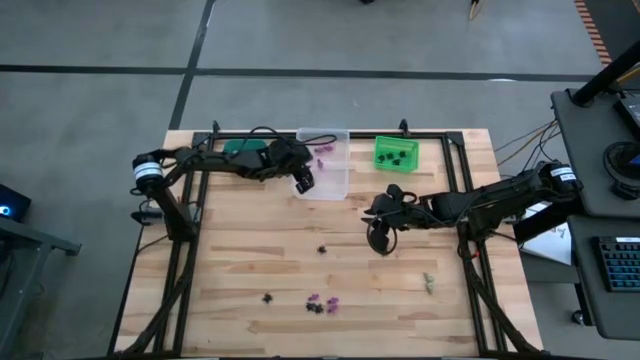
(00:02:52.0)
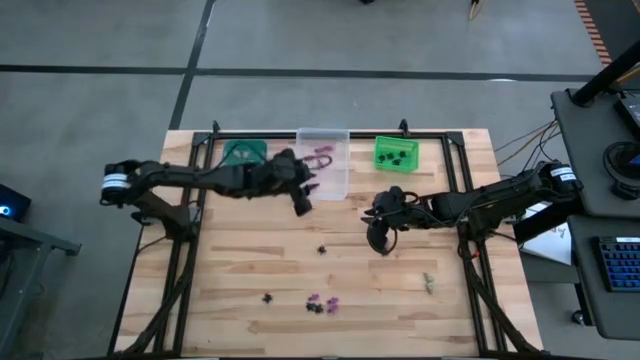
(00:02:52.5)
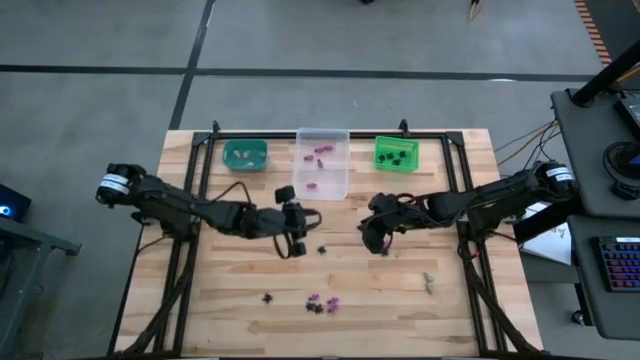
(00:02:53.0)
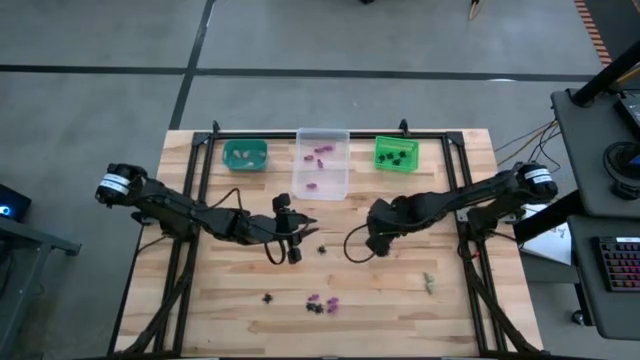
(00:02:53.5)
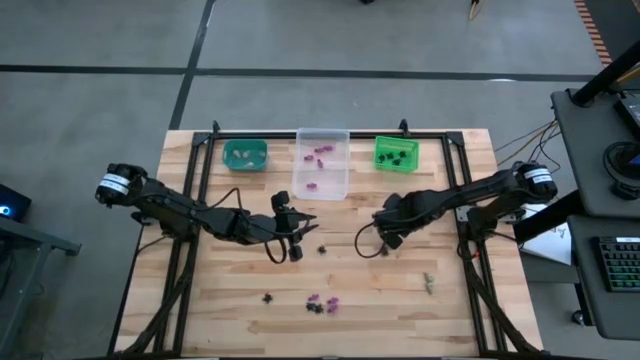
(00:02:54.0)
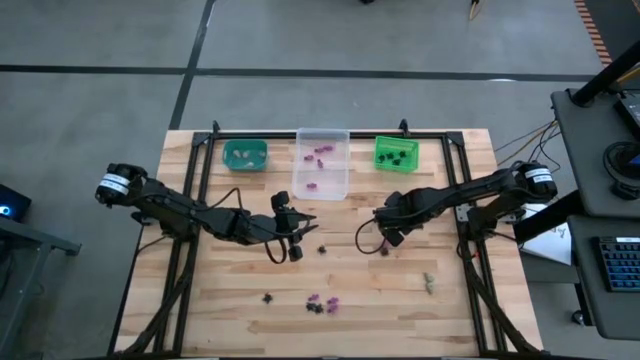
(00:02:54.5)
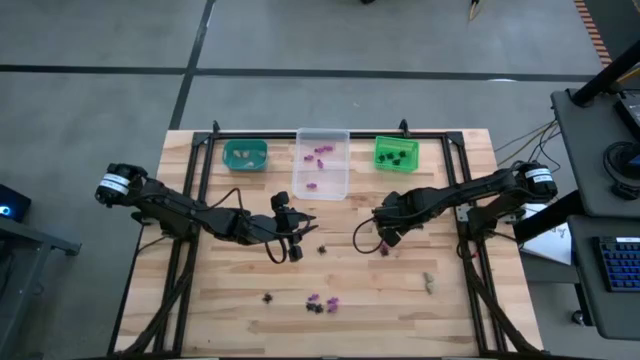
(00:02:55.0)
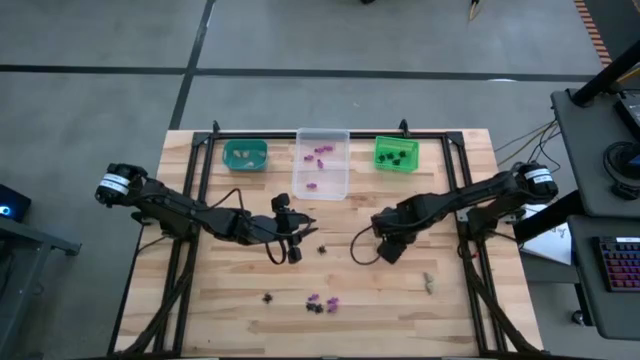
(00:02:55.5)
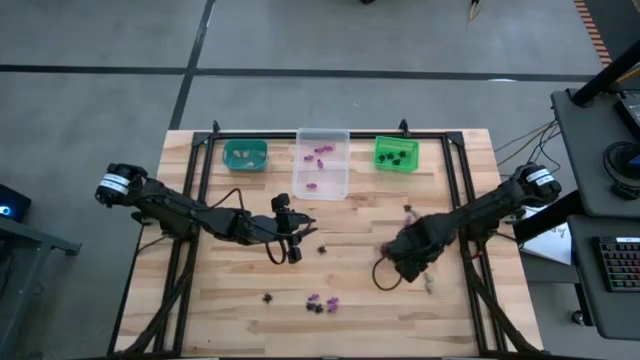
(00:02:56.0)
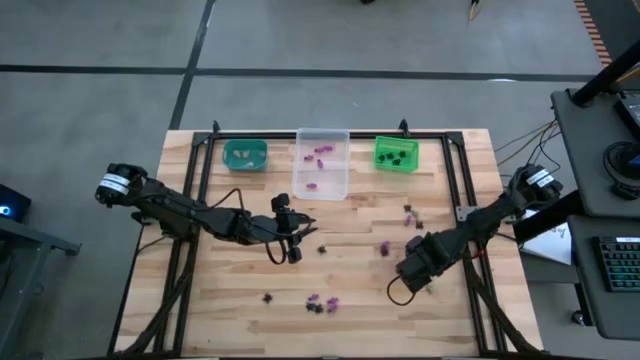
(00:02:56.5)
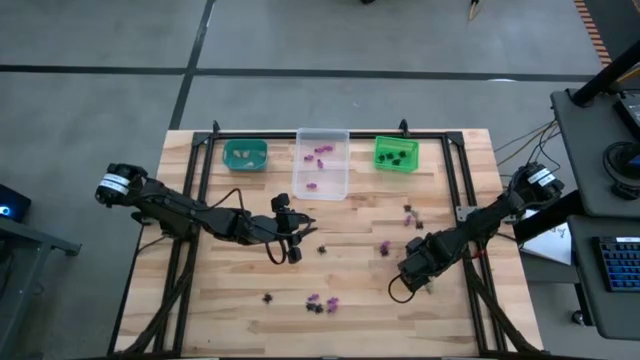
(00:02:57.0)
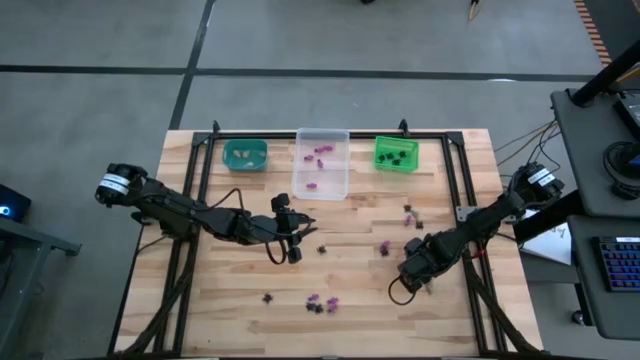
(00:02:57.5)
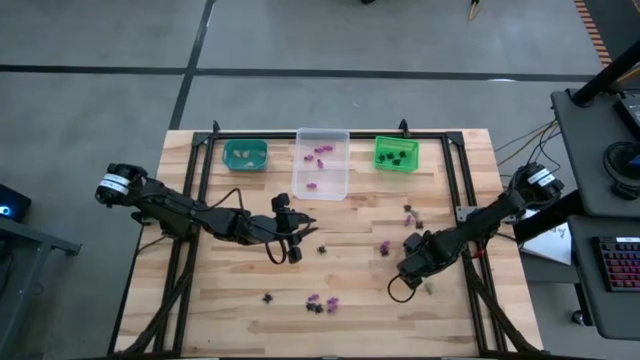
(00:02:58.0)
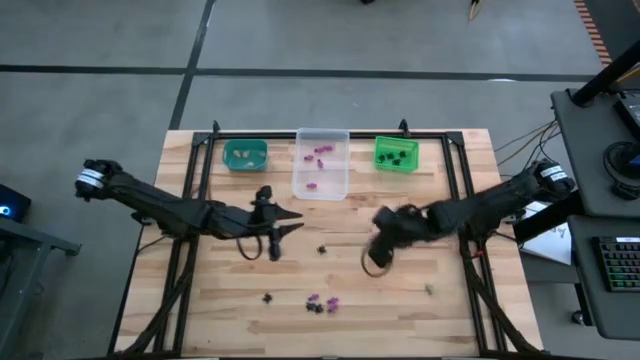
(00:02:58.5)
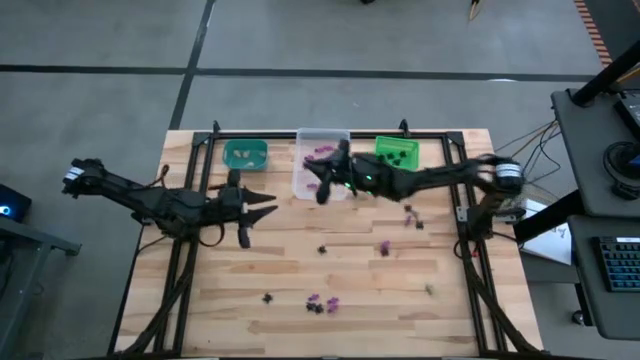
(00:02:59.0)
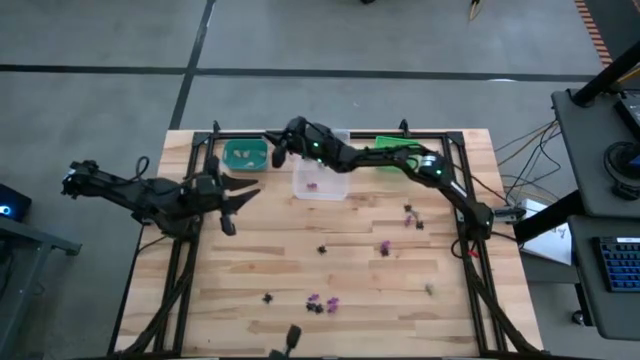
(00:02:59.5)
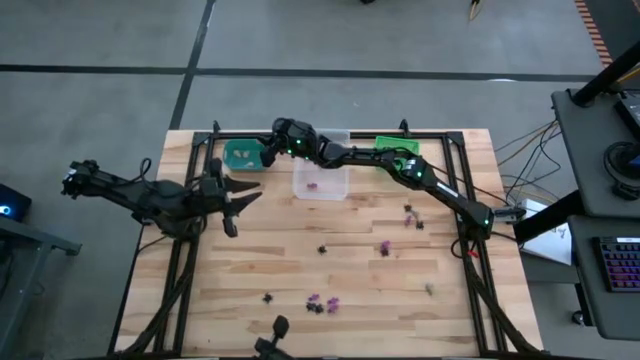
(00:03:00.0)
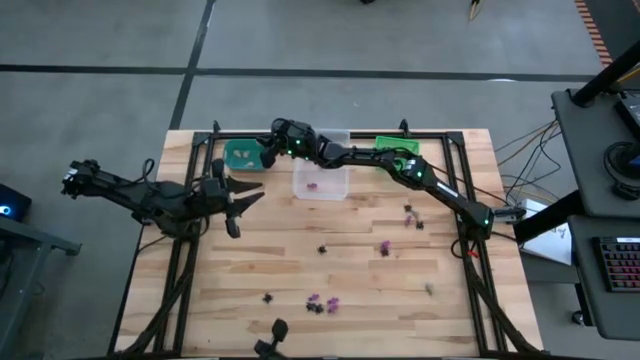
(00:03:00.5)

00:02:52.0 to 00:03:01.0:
Task: Sort Halloween decoration
Put the white skull toy into the light blue bin

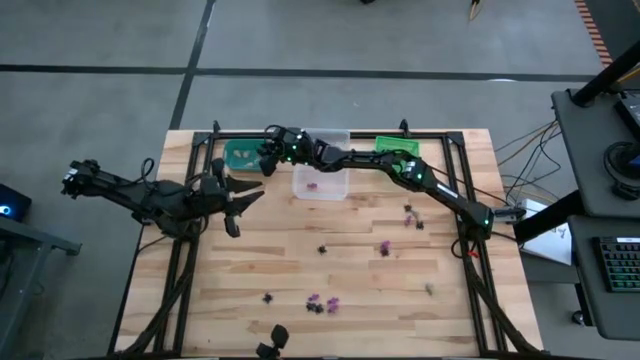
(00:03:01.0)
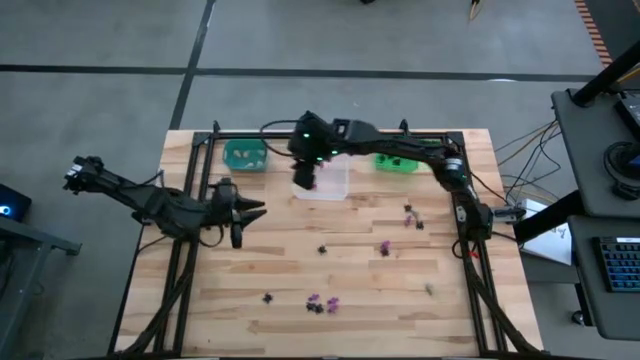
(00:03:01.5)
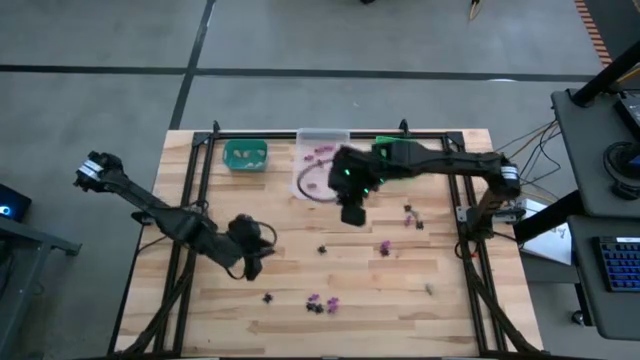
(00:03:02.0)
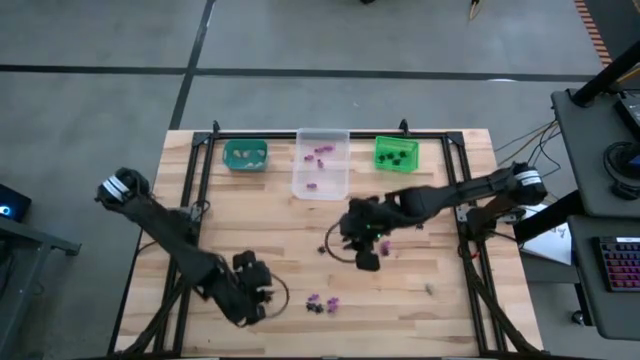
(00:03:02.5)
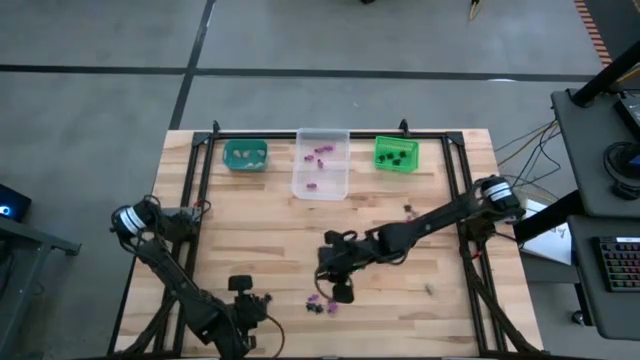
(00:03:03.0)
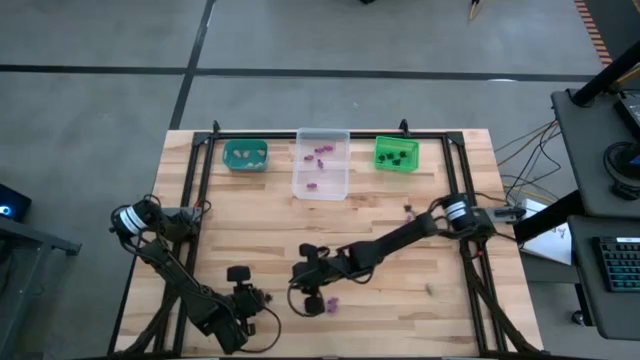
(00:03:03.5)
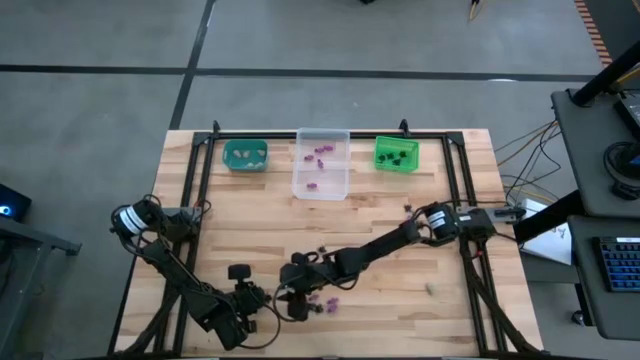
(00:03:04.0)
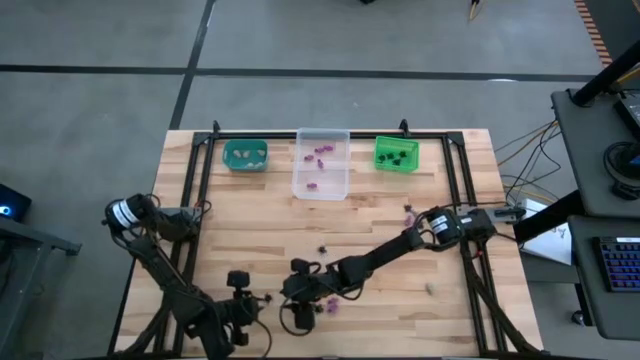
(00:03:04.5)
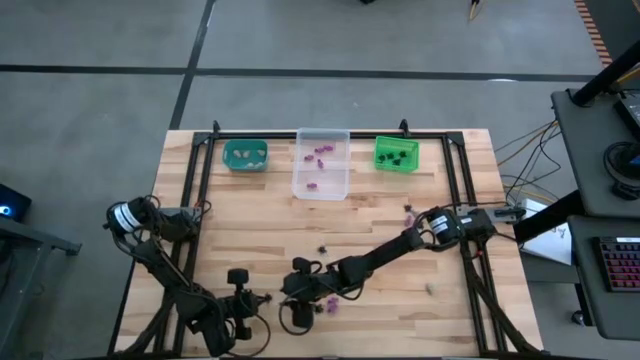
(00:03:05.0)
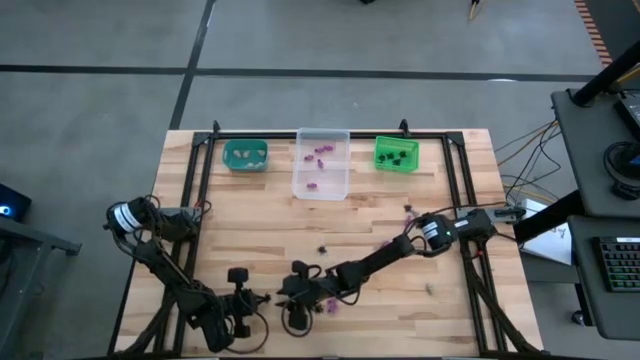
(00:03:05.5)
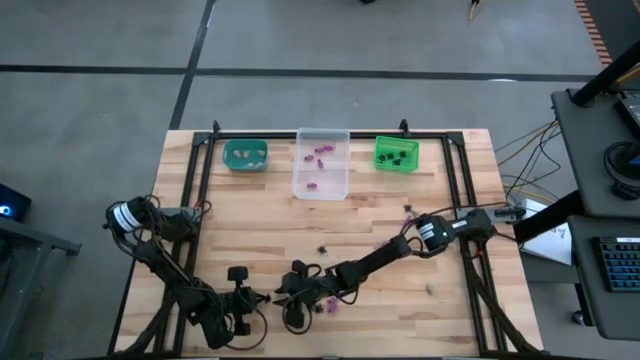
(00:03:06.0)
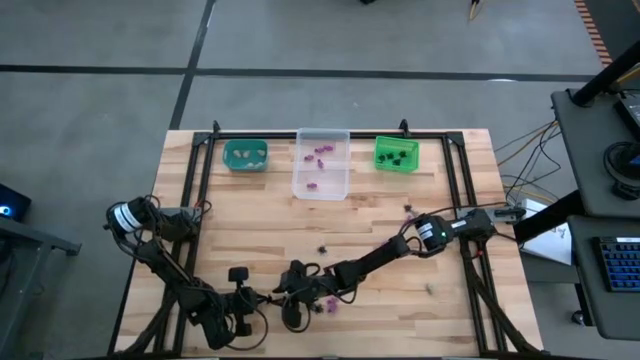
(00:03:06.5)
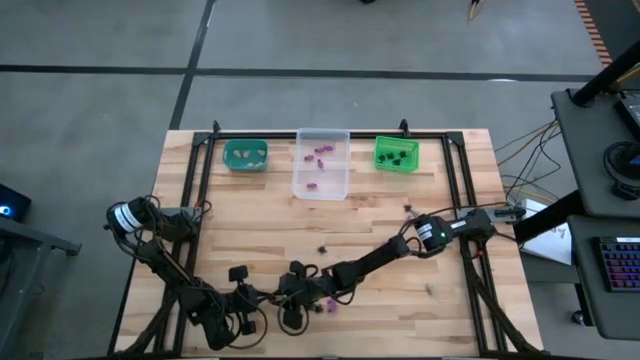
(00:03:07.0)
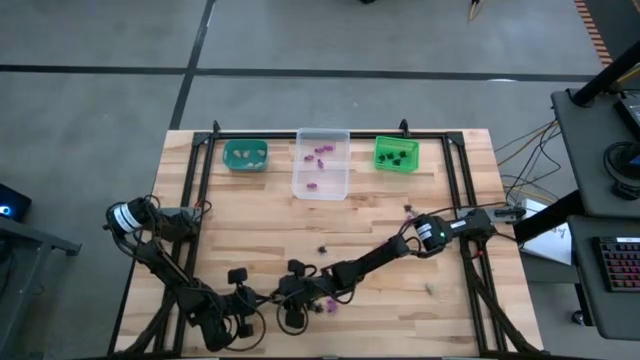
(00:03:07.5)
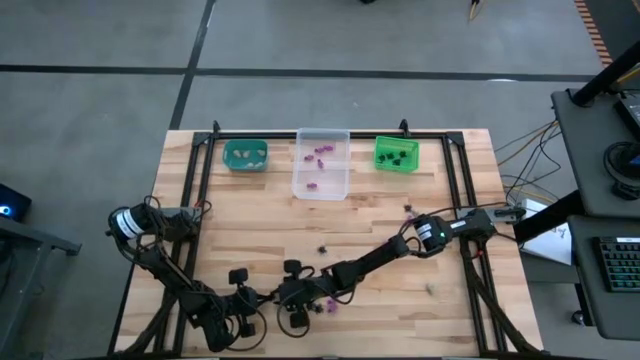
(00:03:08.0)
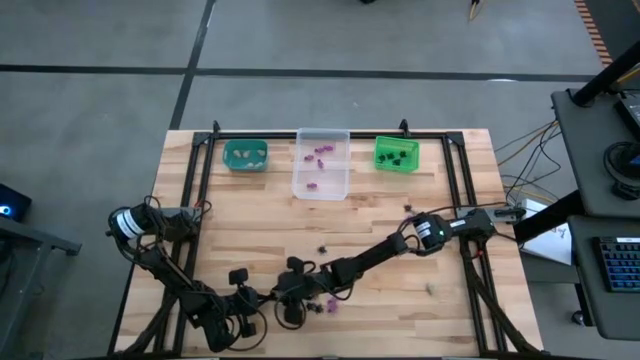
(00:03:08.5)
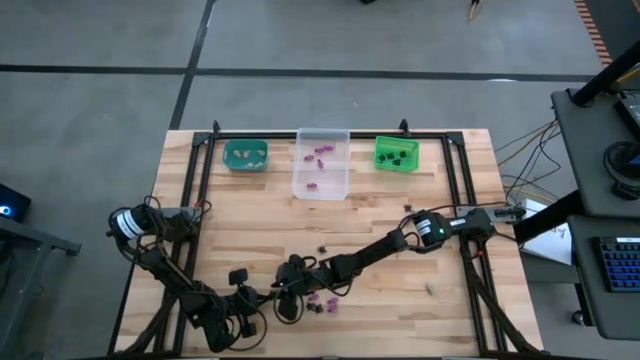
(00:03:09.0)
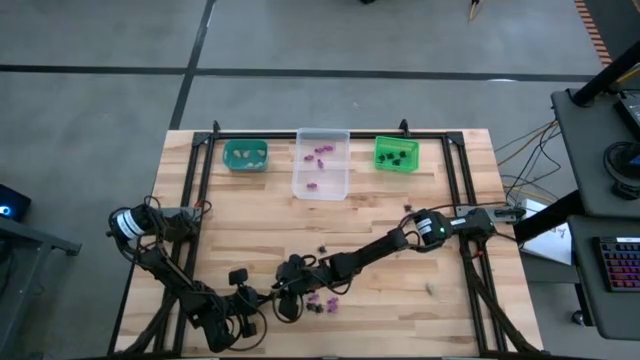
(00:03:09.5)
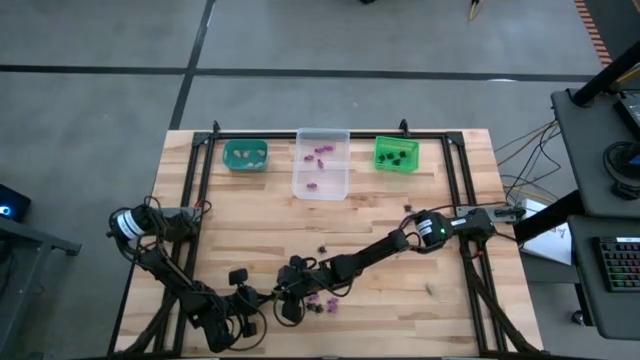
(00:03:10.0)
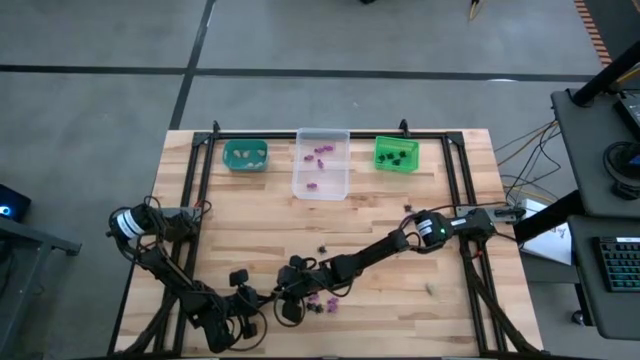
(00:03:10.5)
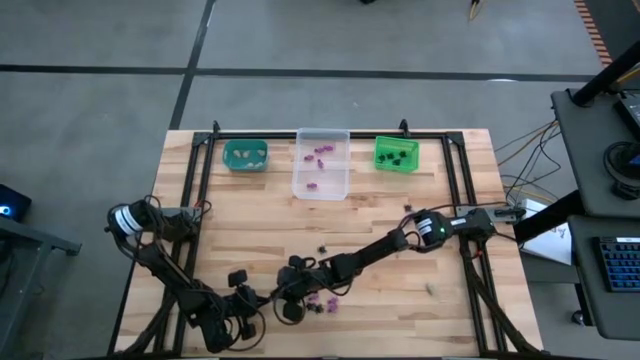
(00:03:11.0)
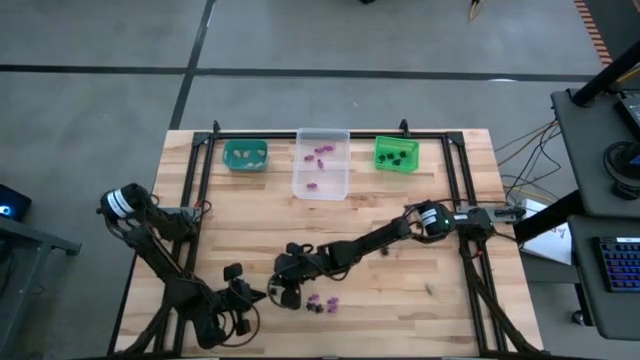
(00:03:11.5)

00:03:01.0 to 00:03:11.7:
Put the black spider toy into the green bin

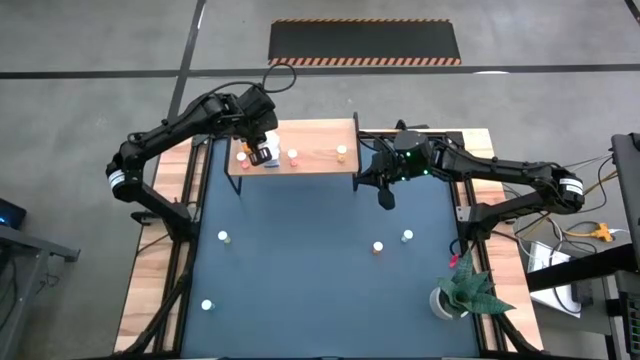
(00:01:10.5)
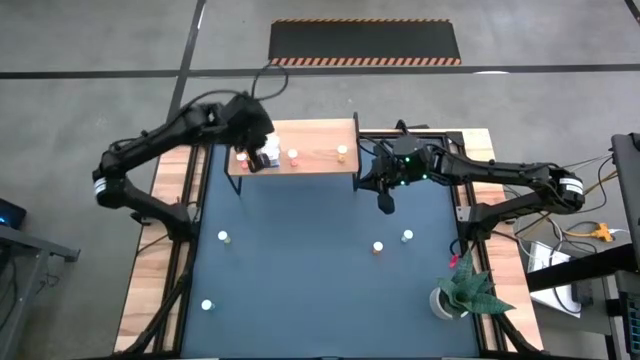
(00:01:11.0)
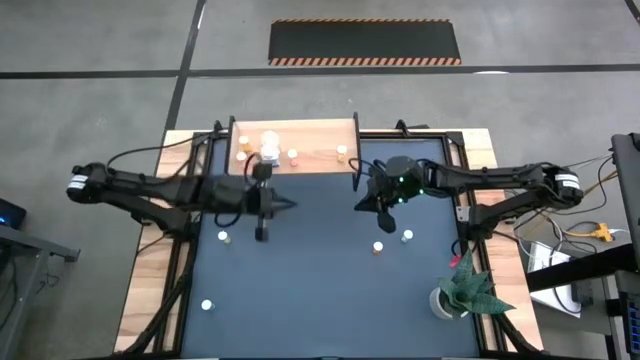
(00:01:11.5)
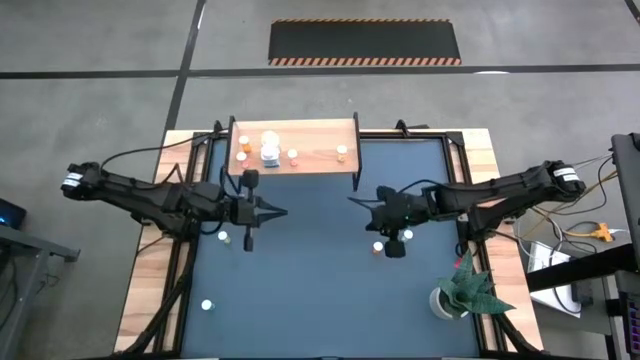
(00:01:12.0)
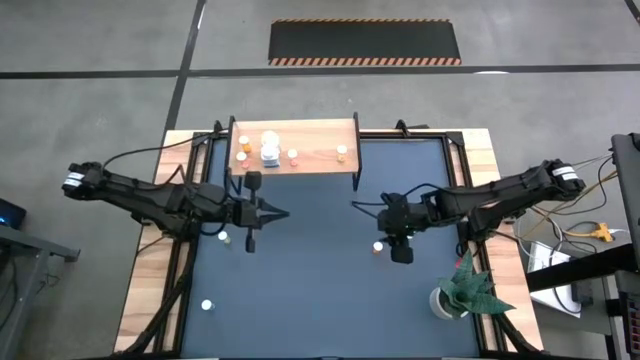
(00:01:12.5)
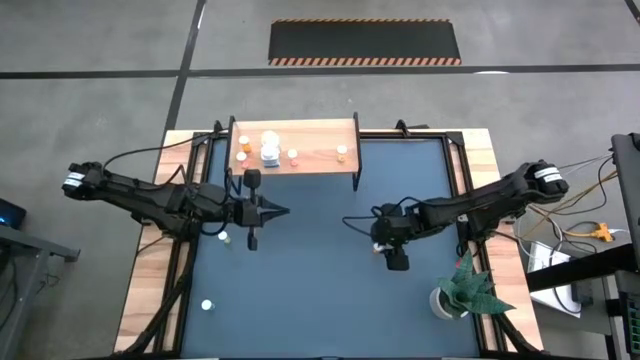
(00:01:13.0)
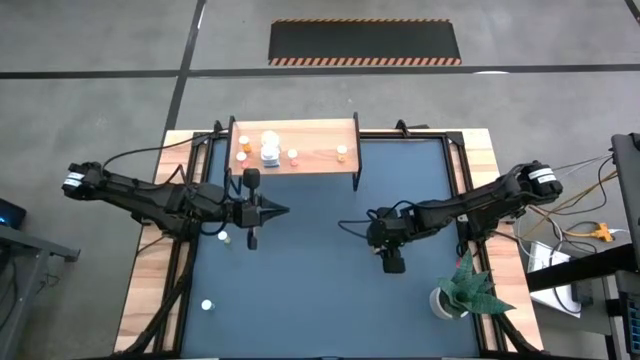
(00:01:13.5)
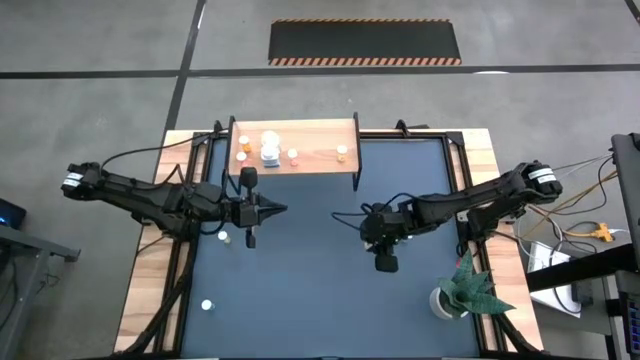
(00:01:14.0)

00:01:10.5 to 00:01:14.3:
Task: Pick and place medicine bottles onto shelf by color
Put the orange pill bottle on the shelf
